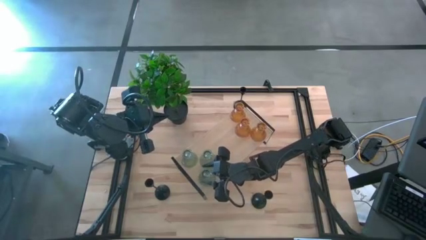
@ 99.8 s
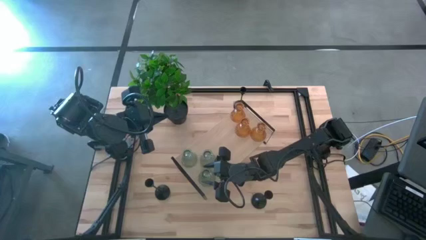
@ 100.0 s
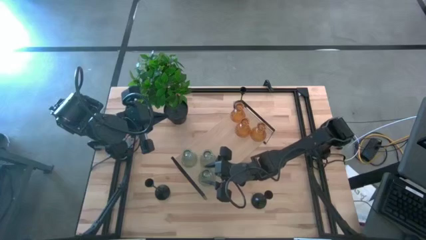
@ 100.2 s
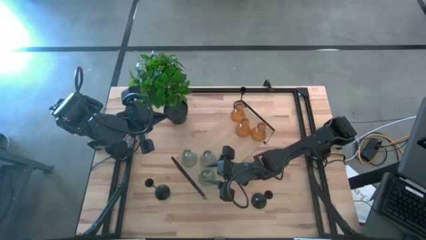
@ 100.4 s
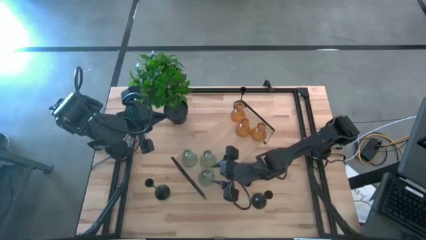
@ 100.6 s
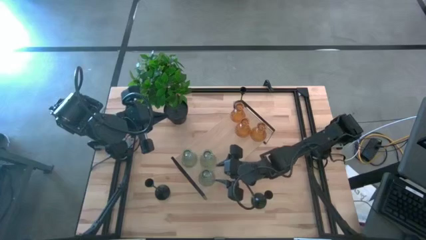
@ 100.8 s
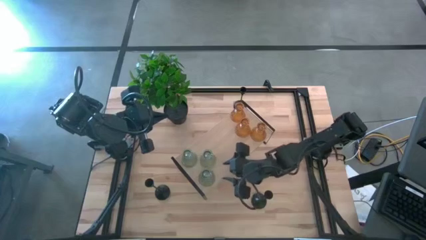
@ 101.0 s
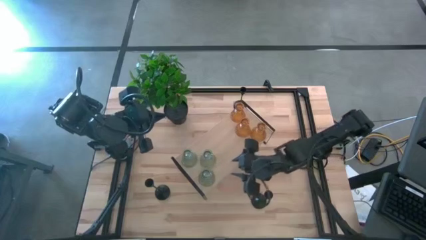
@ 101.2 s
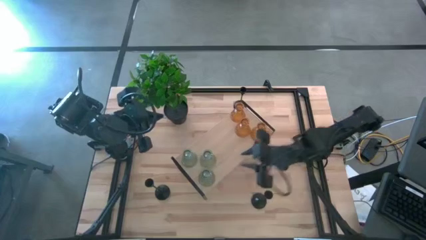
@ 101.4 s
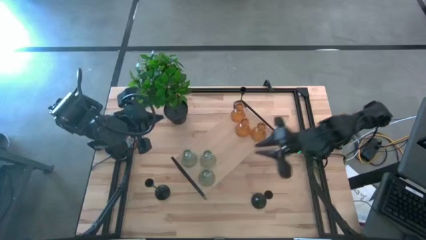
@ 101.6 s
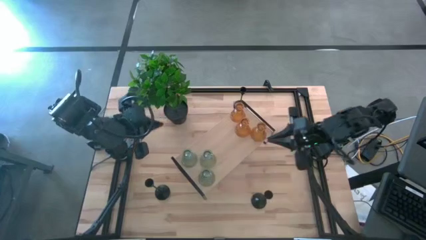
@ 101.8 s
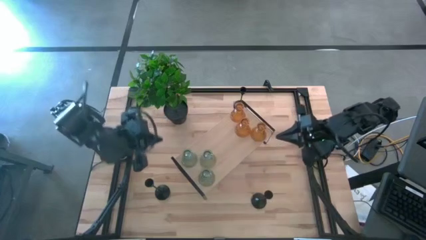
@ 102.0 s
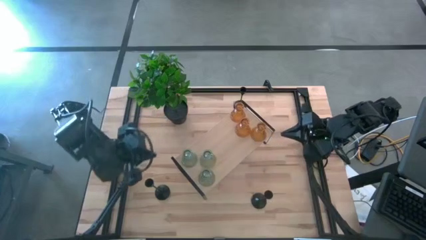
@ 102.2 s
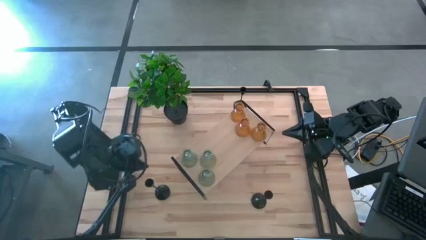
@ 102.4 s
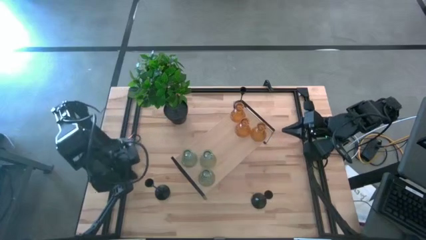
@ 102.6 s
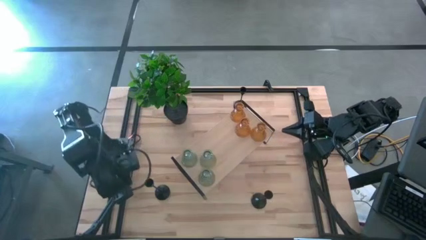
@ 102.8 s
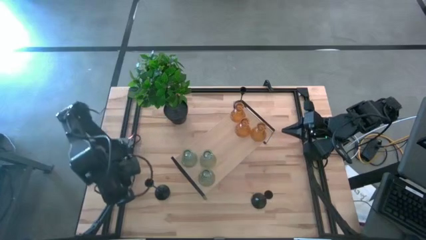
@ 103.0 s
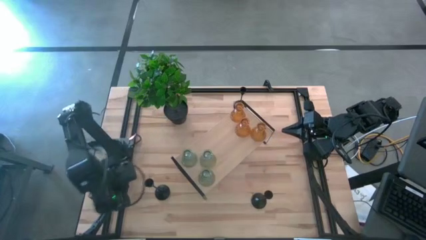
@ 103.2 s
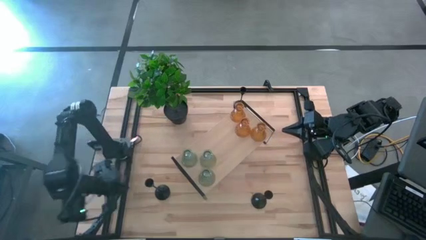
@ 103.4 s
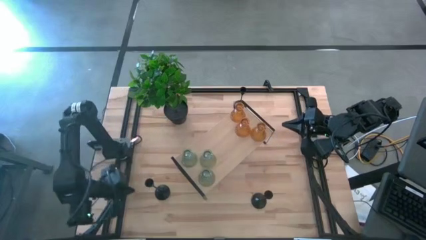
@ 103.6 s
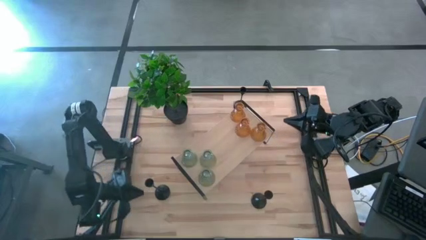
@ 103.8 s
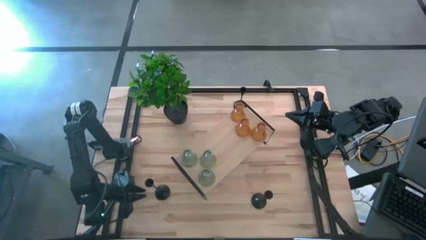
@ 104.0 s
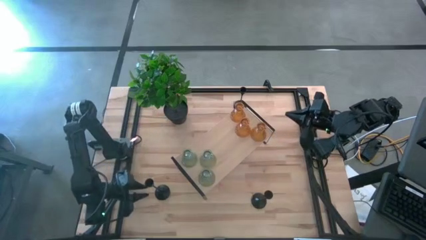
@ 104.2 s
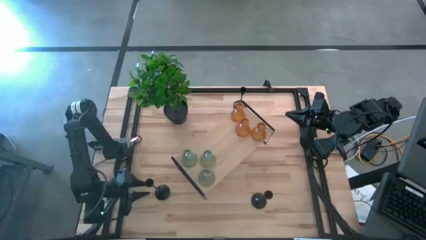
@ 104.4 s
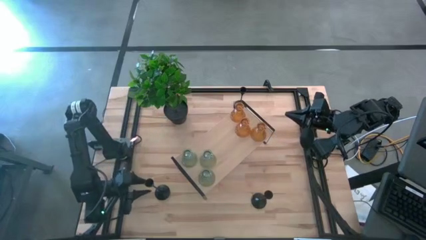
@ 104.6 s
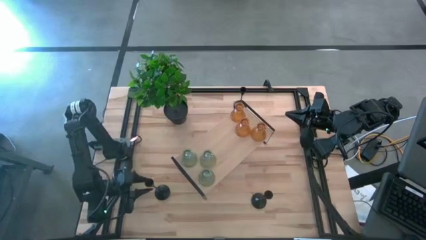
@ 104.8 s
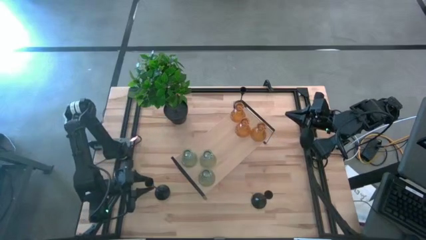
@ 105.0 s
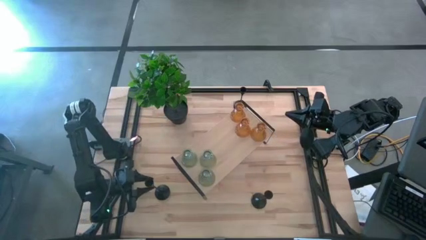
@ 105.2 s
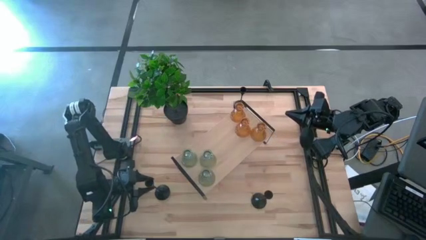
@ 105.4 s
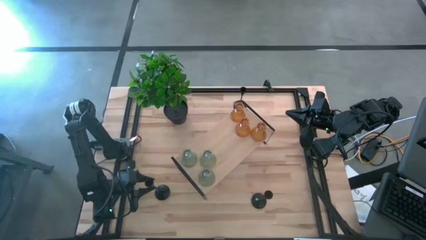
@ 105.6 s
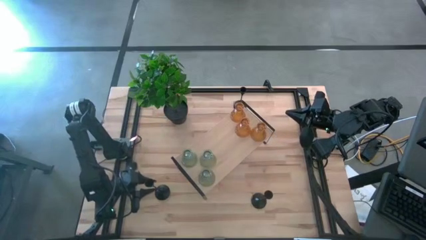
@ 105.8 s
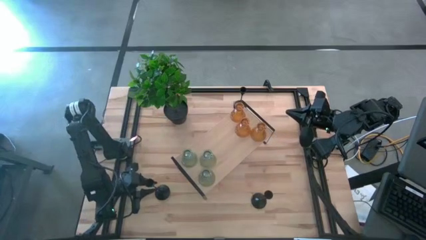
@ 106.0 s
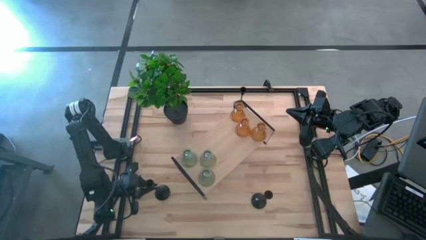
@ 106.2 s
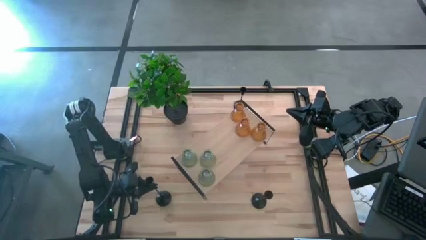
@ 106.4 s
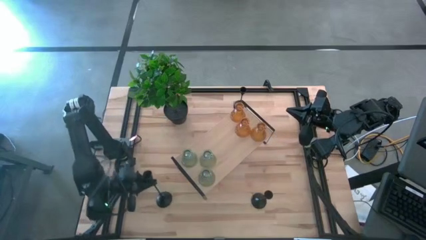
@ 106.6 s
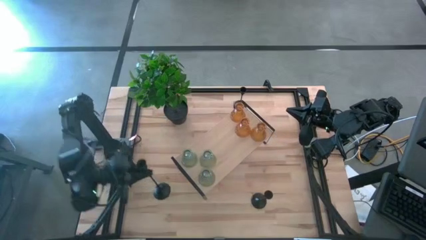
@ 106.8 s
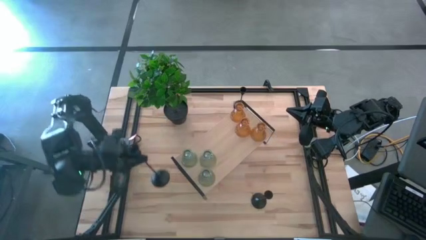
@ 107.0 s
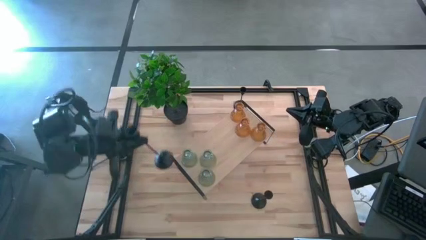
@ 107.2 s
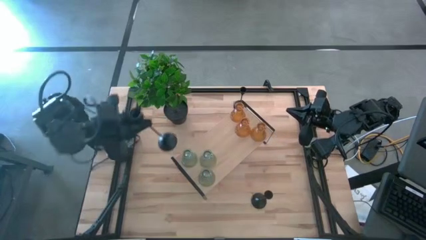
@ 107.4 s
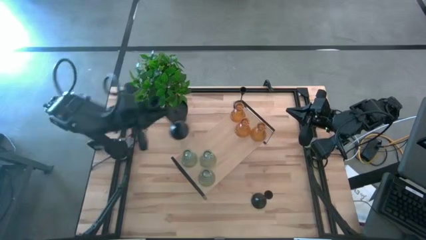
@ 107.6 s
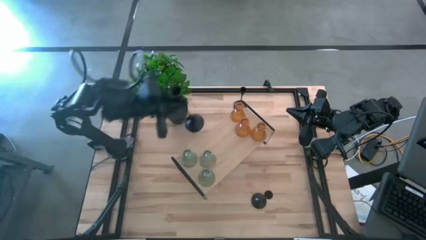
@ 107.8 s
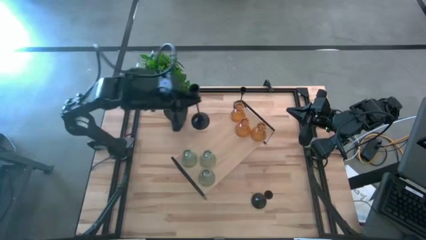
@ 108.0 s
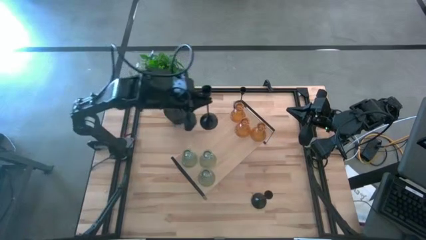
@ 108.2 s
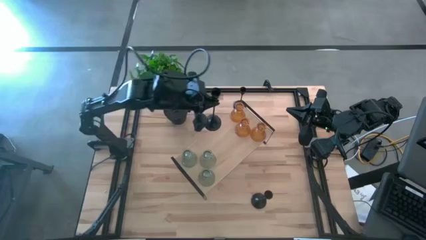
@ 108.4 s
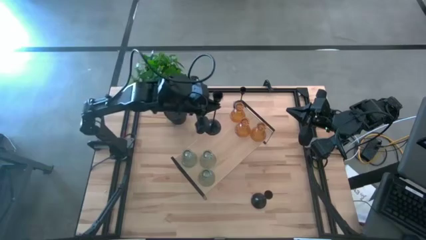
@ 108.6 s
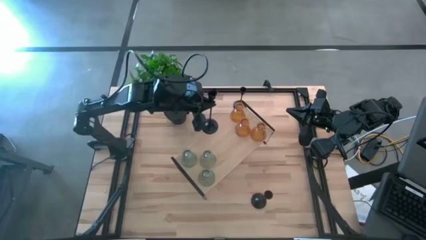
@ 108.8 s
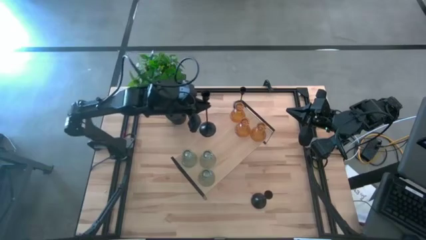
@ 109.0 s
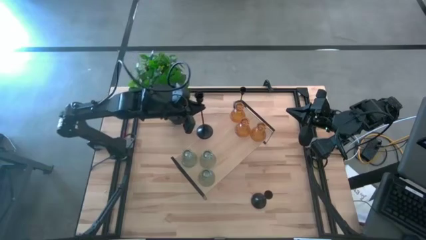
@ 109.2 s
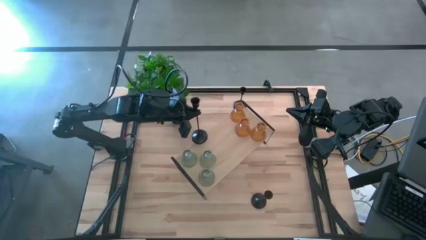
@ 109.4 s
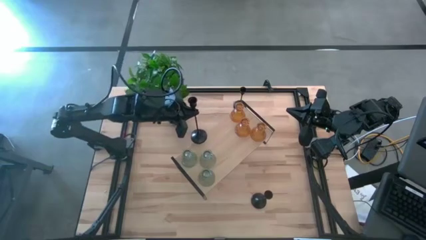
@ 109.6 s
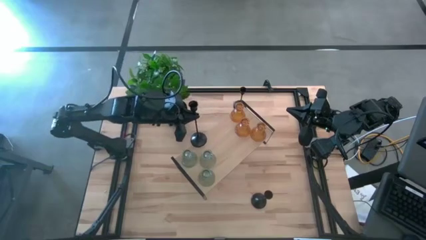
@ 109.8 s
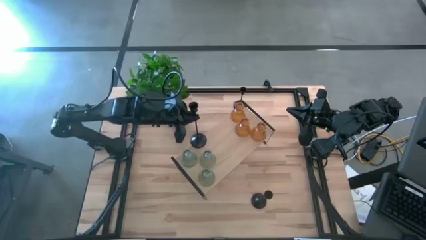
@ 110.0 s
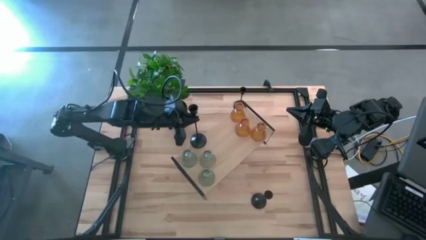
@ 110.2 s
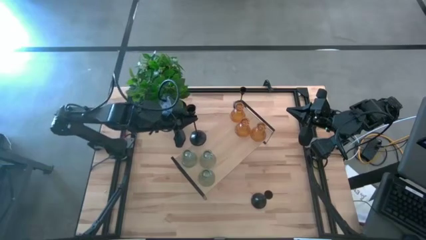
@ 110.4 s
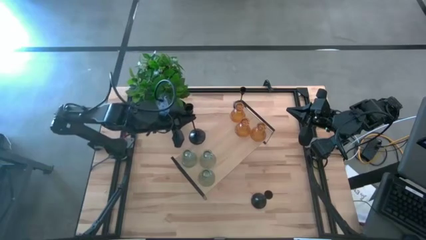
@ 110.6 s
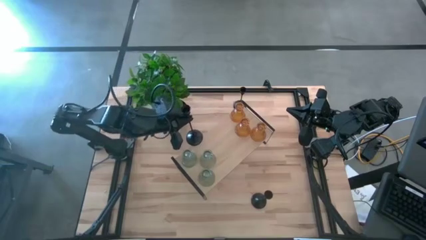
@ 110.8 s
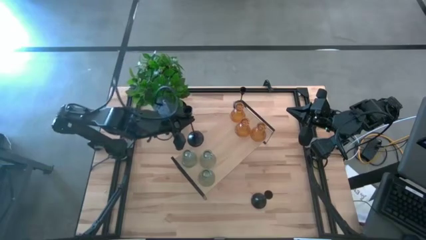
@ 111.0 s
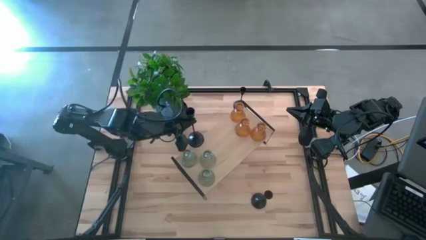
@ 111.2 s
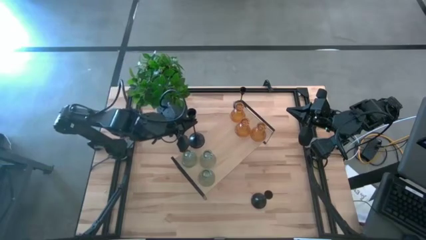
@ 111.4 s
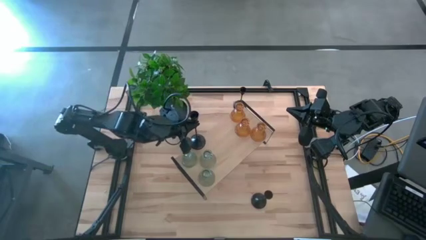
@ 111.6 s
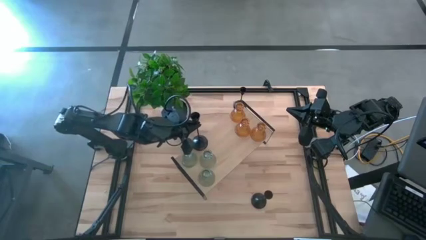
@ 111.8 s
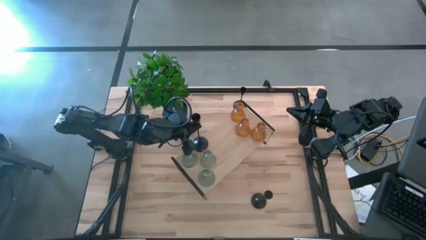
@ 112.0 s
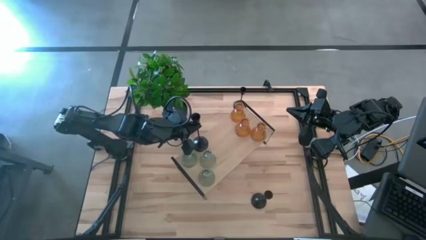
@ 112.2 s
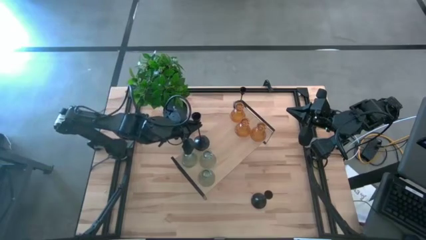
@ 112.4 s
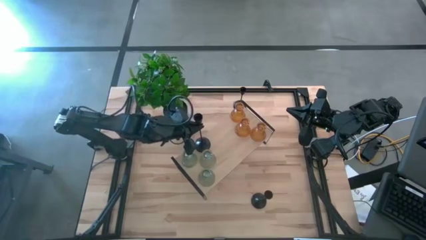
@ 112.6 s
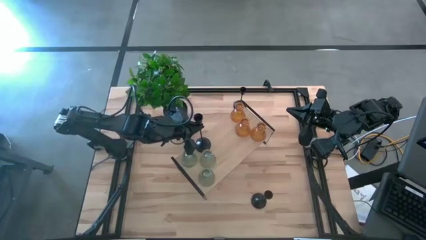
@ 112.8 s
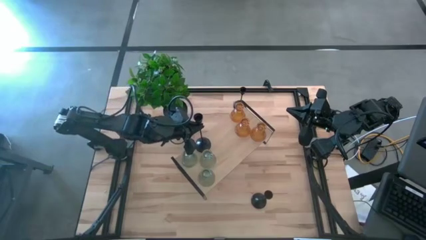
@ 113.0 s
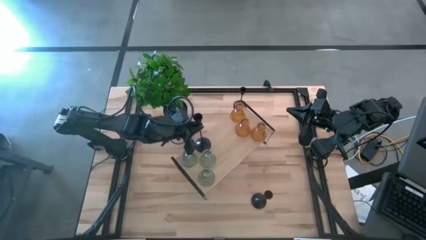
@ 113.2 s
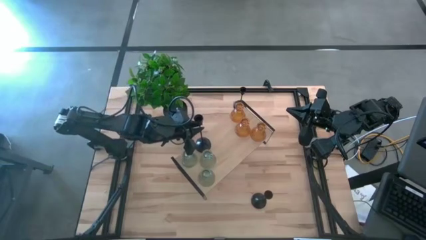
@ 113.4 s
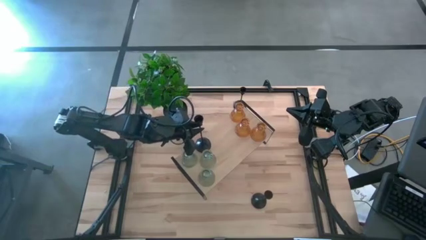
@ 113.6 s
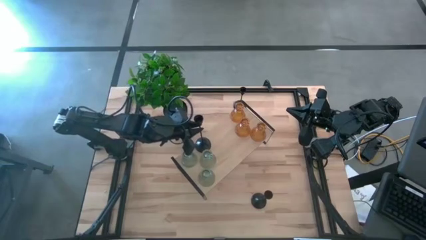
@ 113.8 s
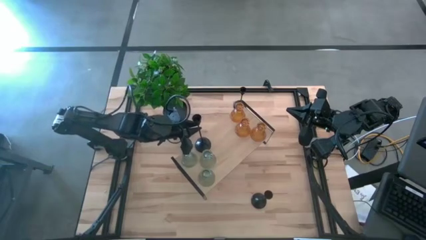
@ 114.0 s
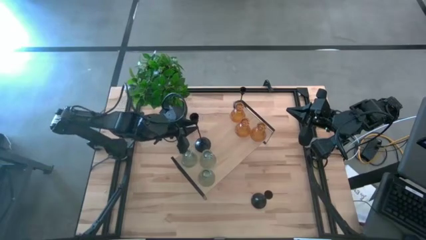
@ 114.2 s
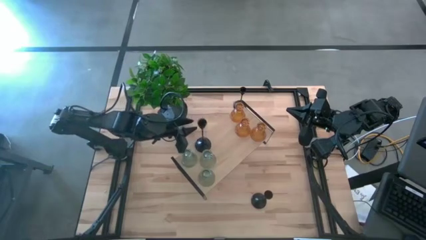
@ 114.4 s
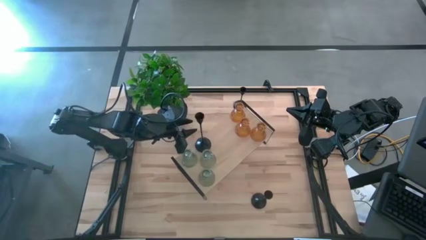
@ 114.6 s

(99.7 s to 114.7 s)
Task: Pick & Place candle stick holders
Put the bottom left black candle holder on the shelf
